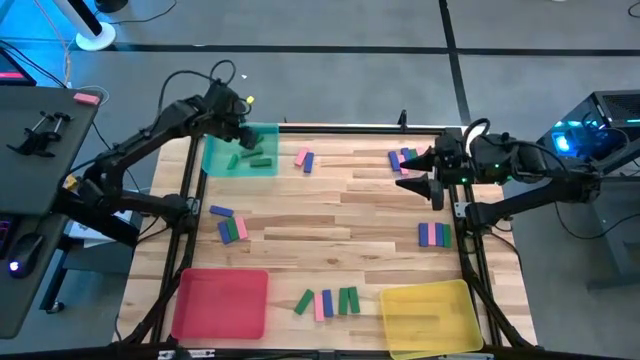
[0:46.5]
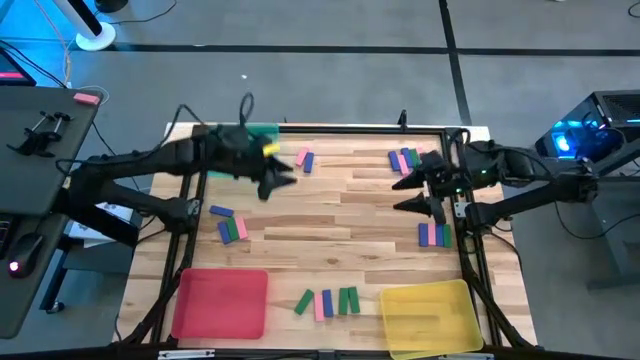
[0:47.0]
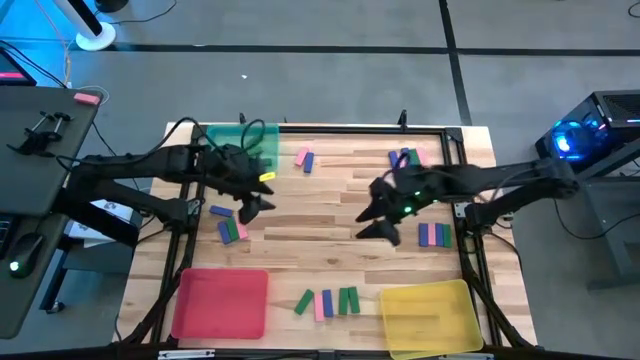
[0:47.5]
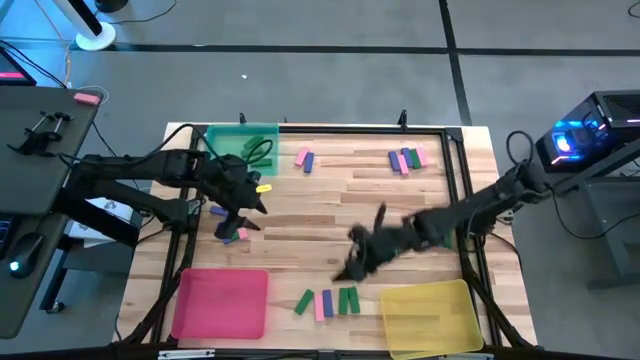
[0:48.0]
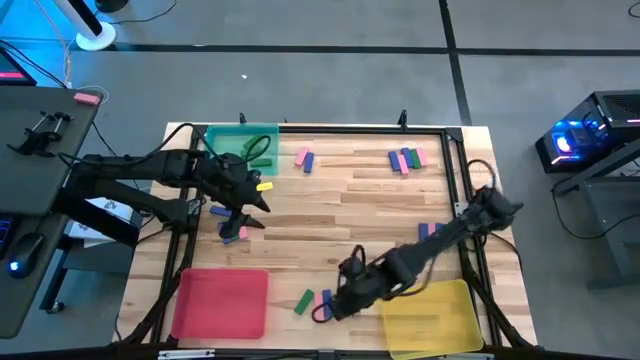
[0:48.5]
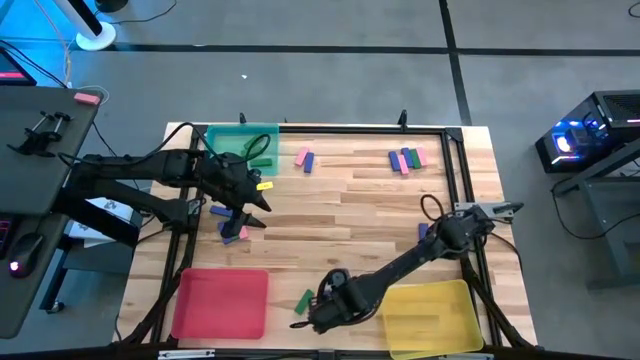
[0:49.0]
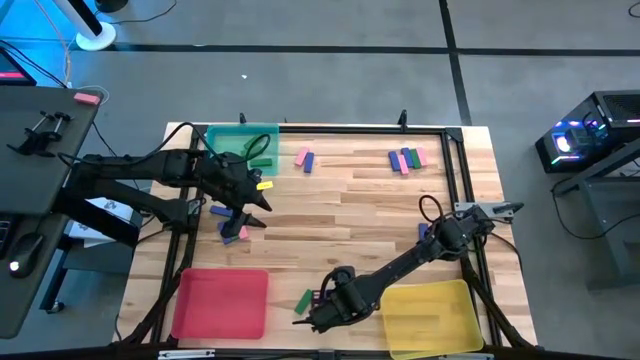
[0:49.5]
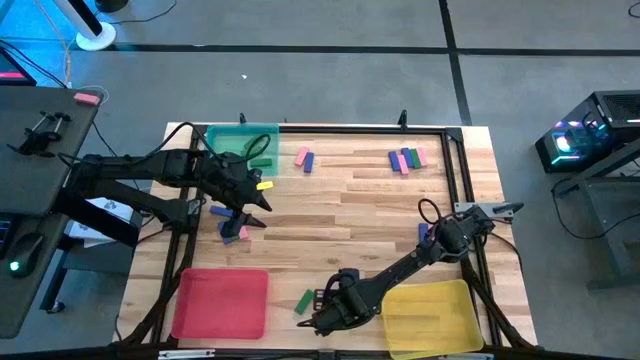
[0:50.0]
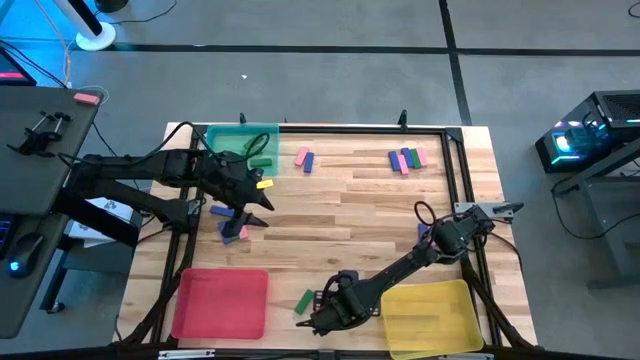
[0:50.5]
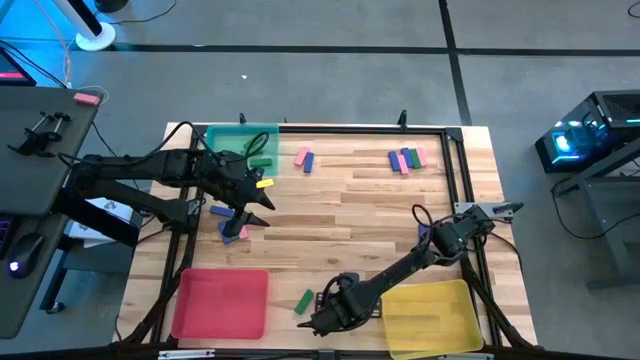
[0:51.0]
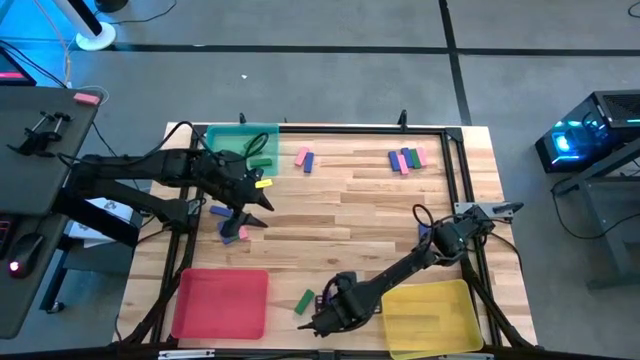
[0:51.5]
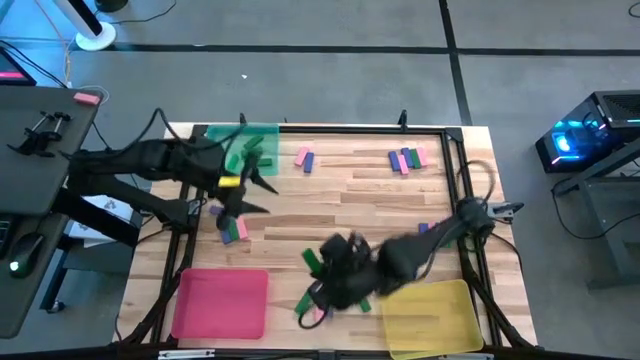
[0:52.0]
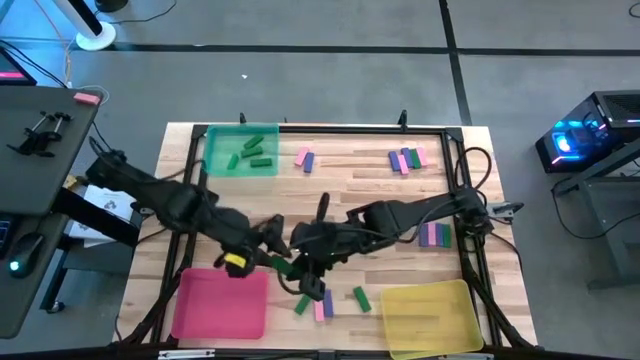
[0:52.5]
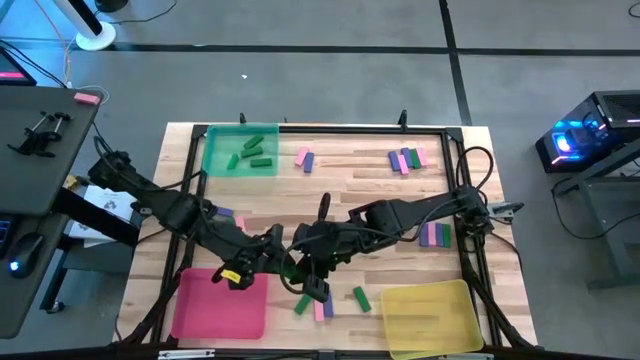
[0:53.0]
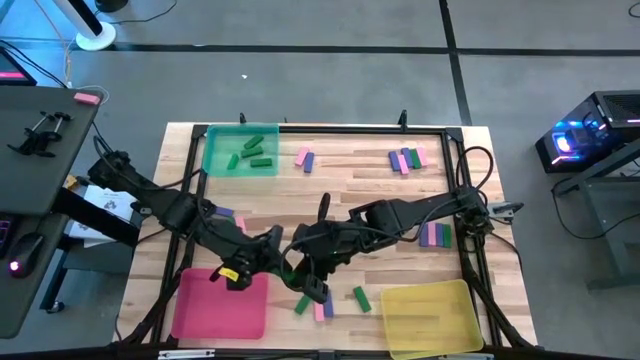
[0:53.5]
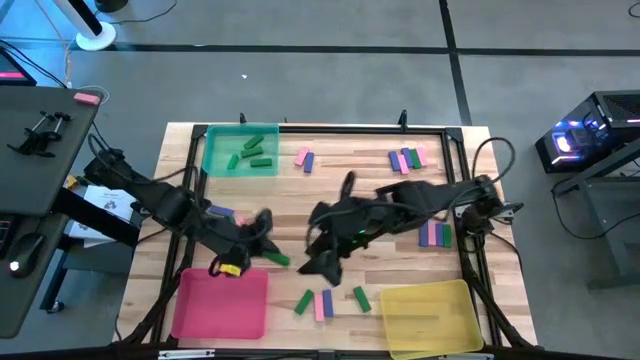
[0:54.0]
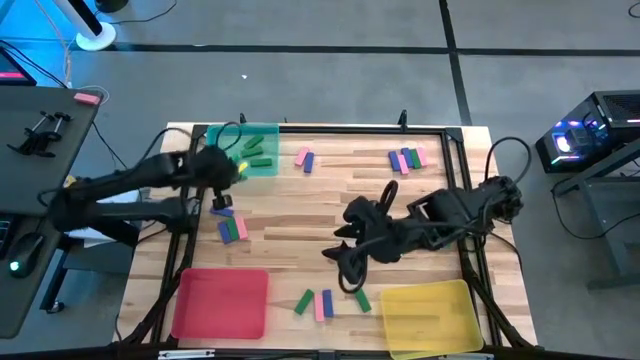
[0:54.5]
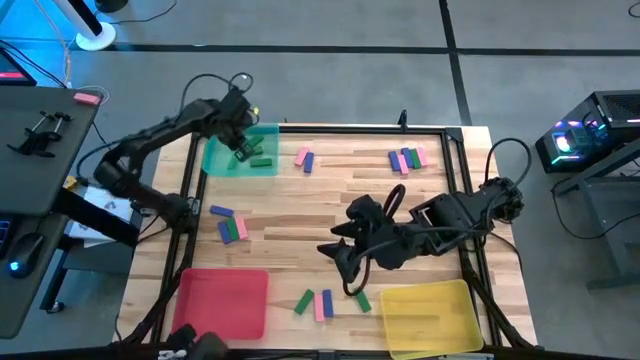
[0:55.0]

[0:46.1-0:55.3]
Task: Sort blocks
Put the green block into the blue bin

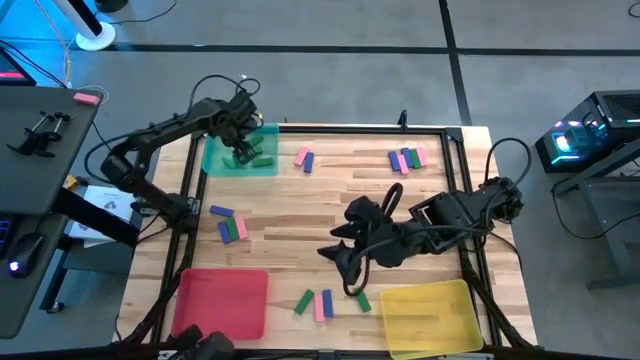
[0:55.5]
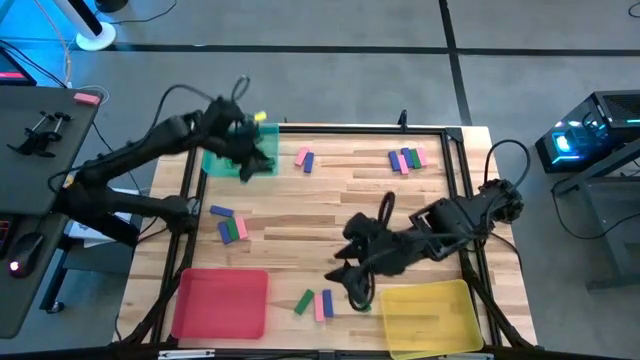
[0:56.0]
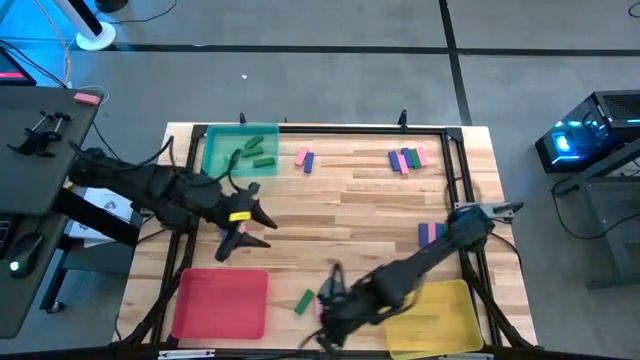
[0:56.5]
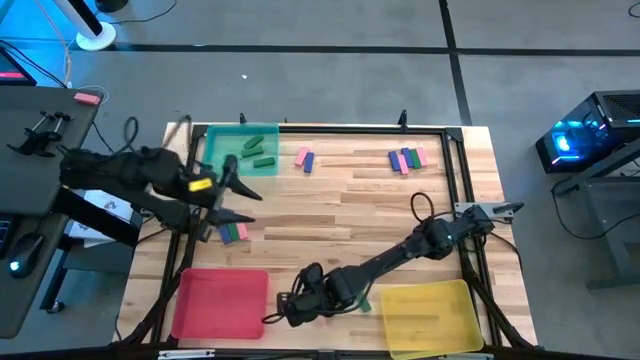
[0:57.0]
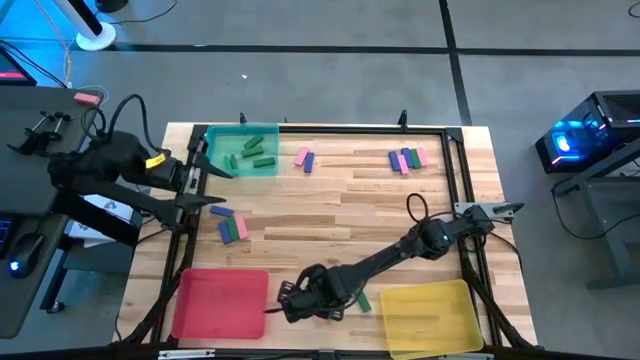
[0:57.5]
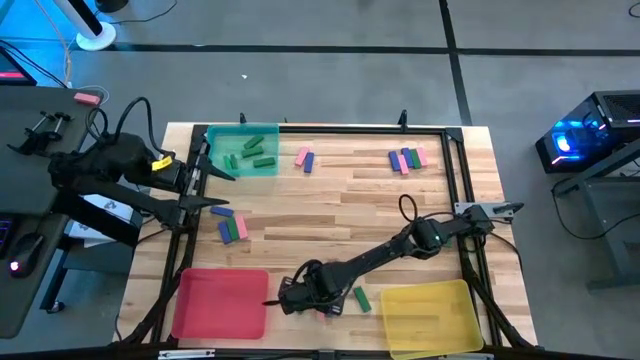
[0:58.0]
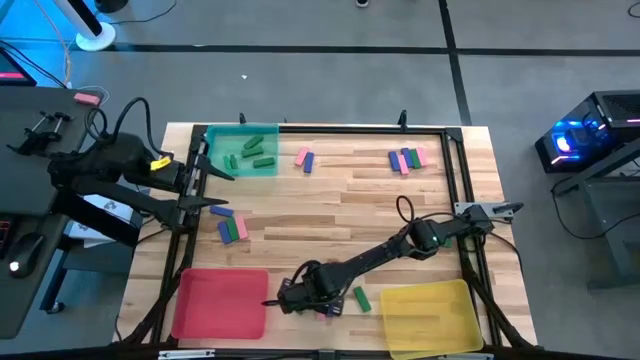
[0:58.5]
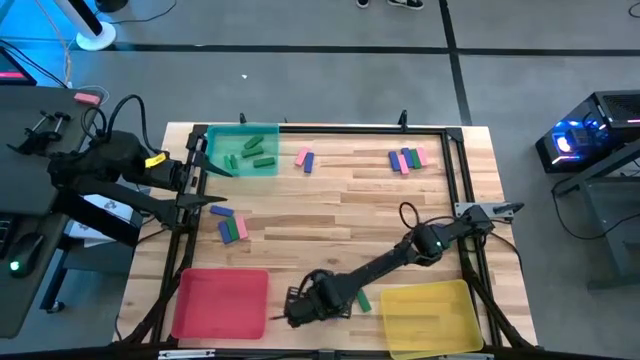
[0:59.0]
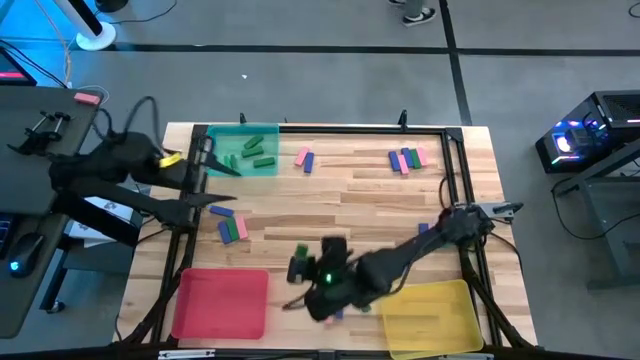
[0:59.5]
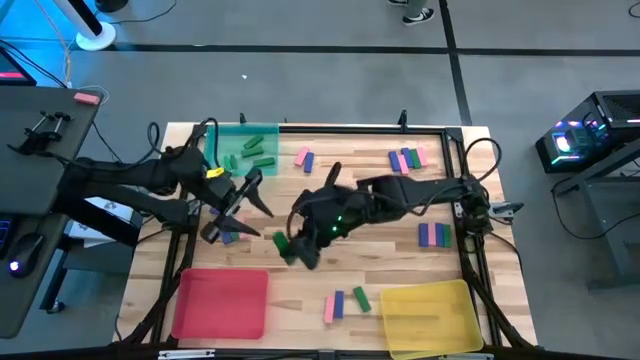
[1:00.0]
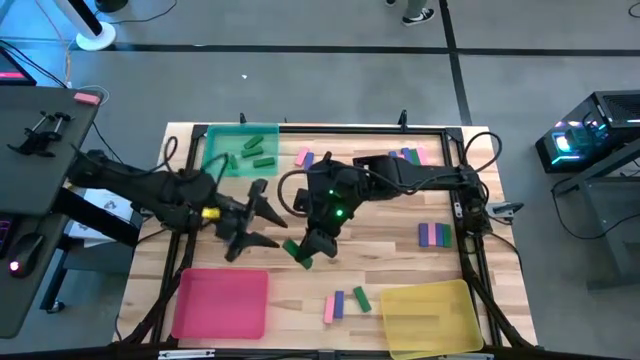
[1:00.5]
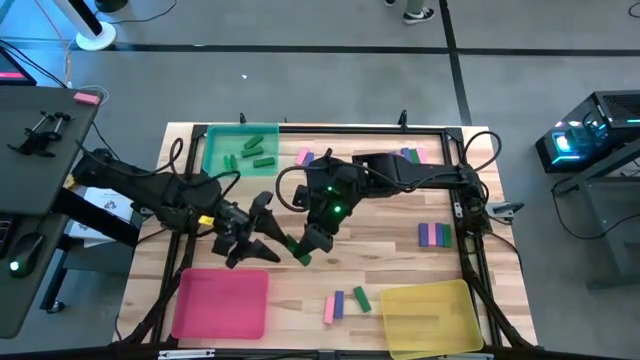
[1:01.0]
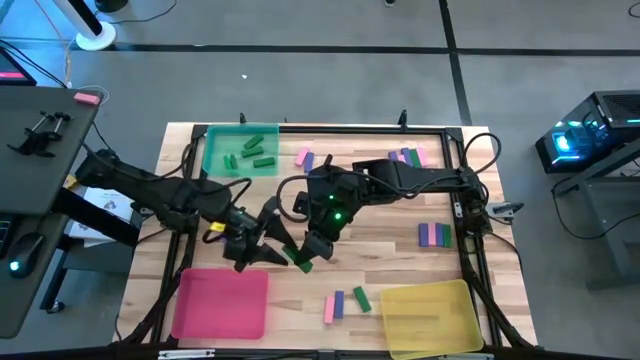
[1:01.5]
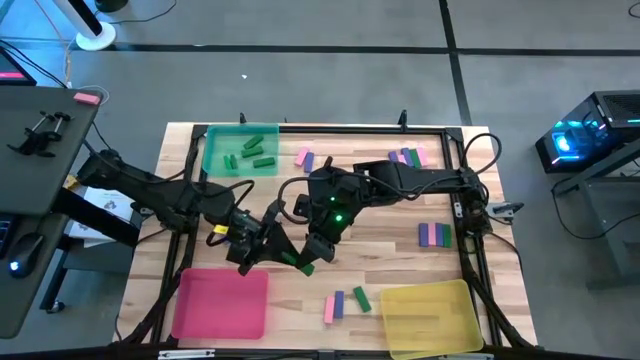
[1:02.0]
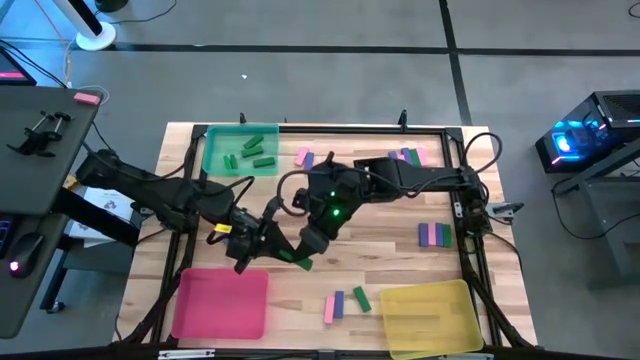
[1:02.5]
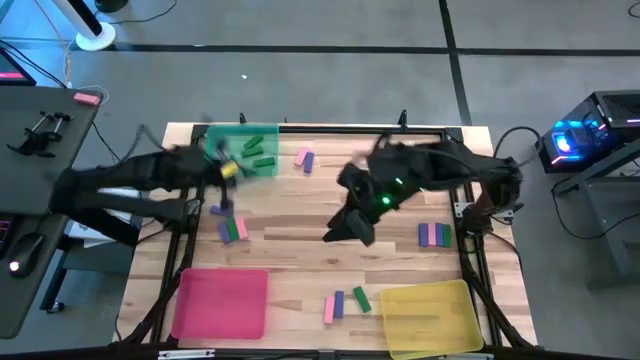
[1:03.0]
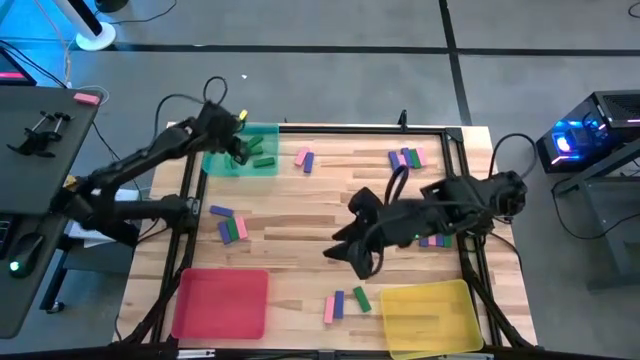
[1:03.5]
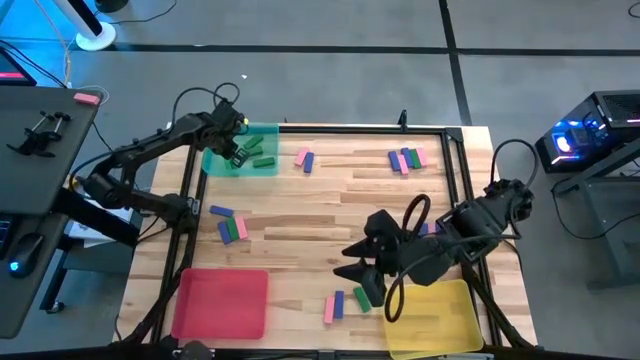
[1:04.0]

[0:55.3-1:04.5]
Put the green block into the blue bin

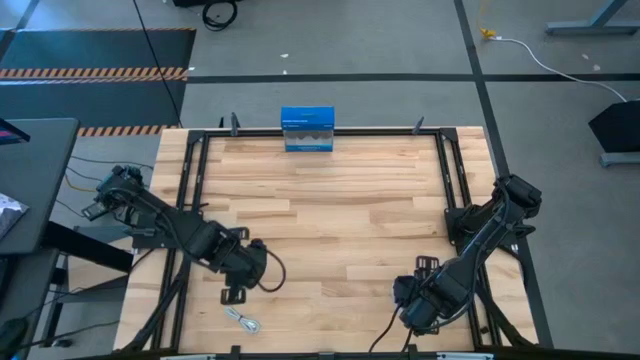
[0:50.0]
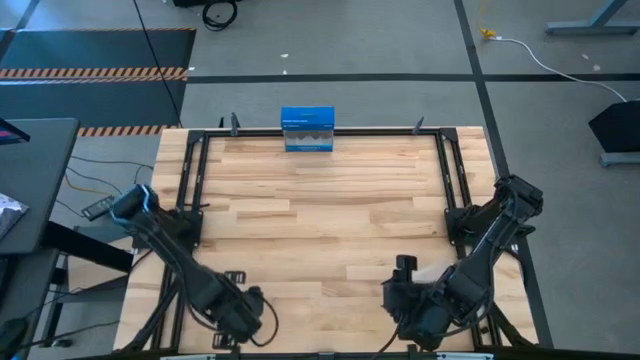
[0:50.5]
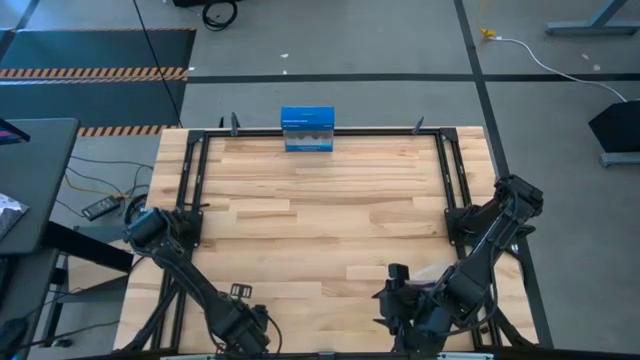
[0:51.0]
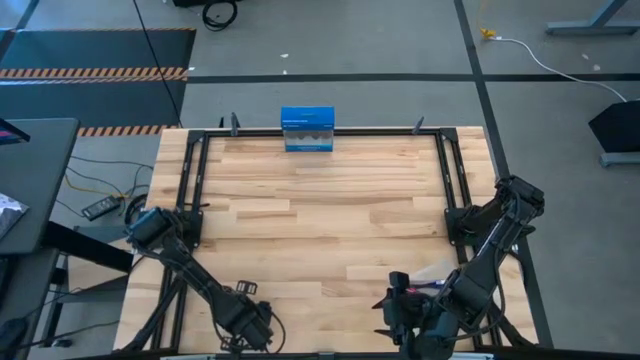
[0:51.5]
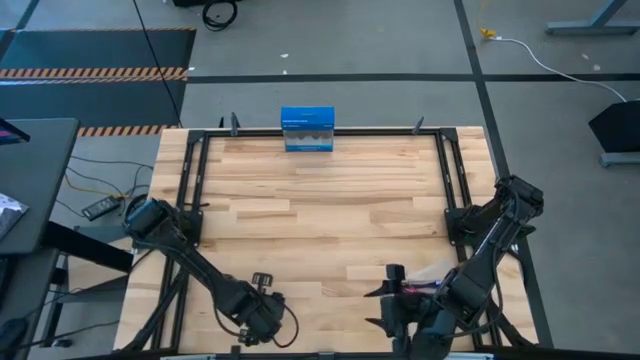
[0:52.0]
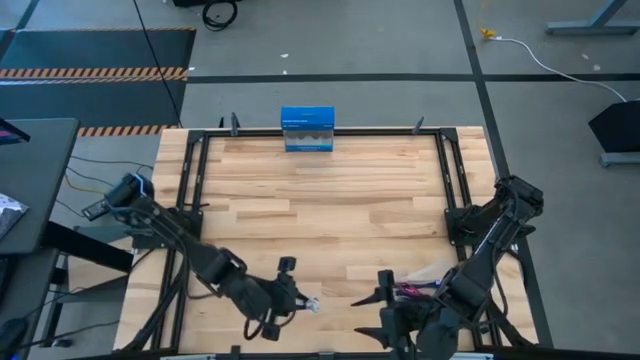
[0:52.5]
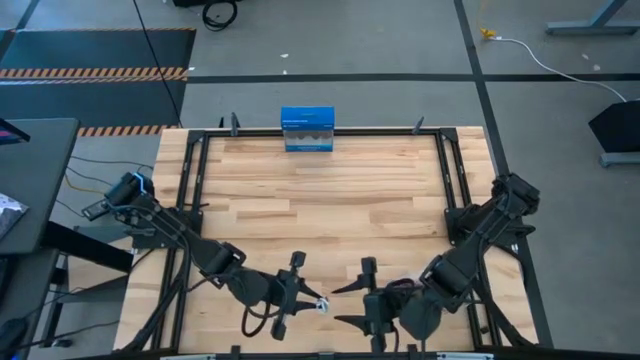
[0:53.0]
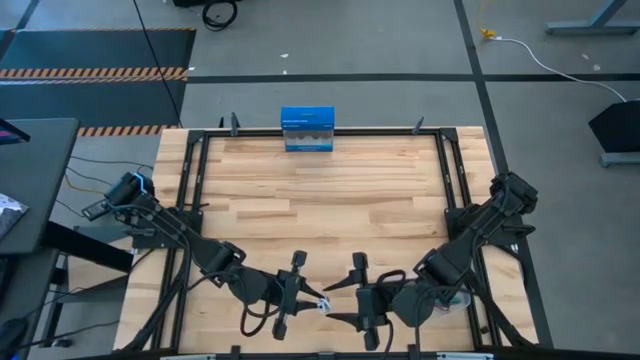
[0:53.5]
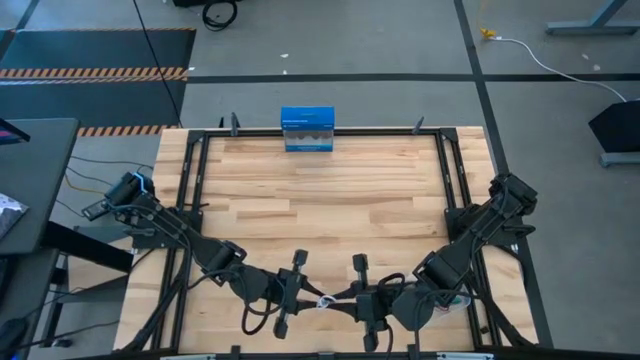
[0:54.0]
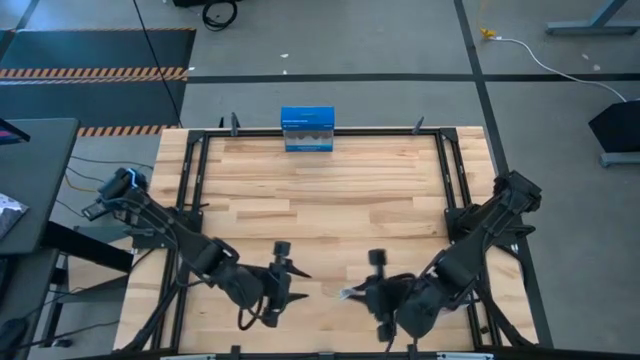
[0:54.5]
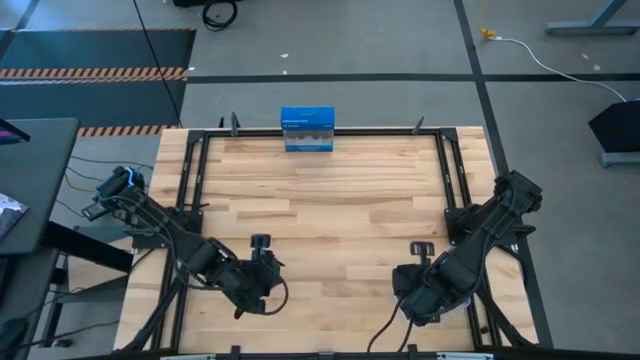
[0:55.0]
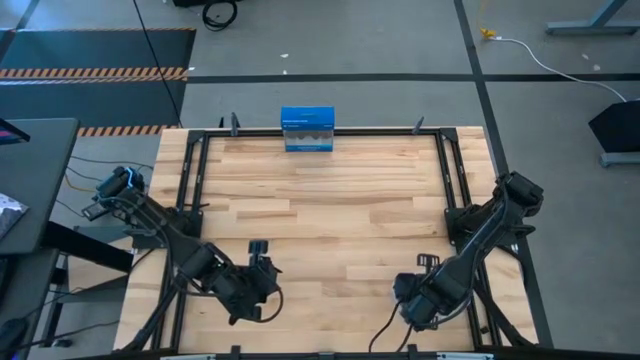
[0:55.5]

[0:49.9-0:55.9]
Task: Pick and place USB-C Cables
Put the white charger cable into the transparent bin
